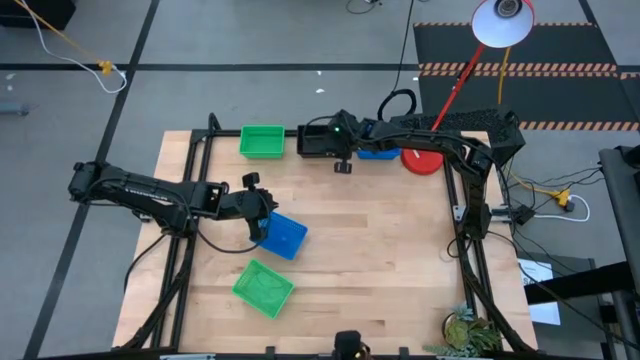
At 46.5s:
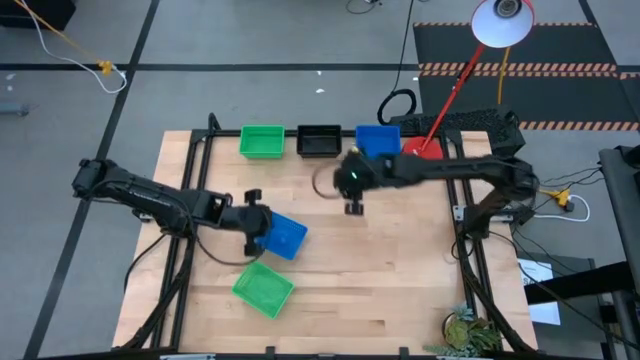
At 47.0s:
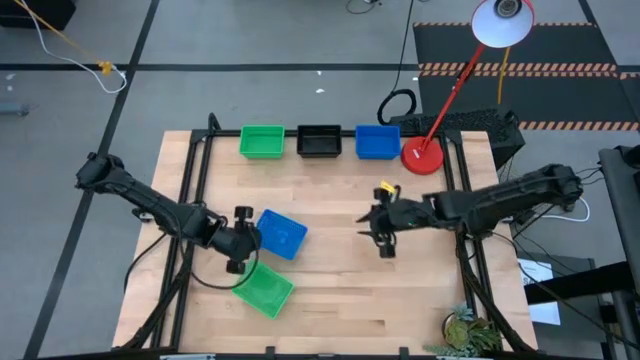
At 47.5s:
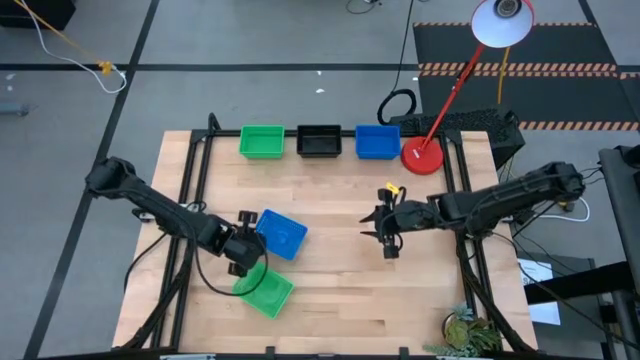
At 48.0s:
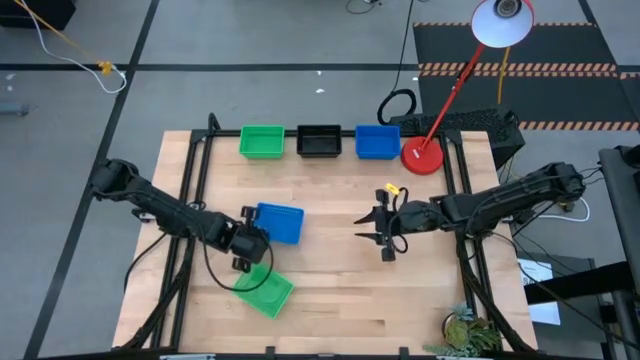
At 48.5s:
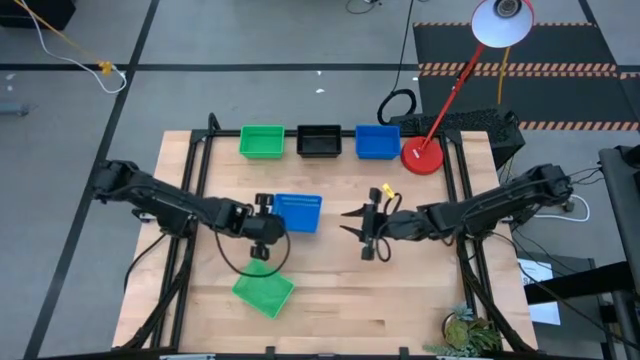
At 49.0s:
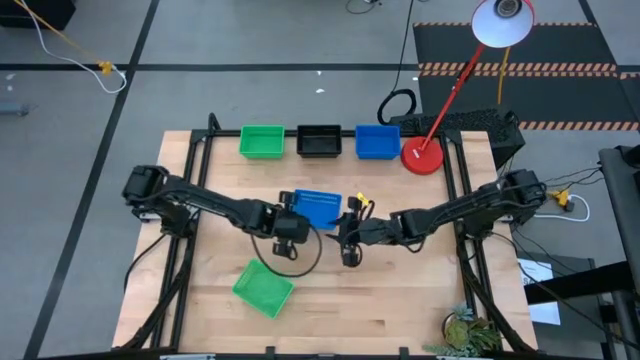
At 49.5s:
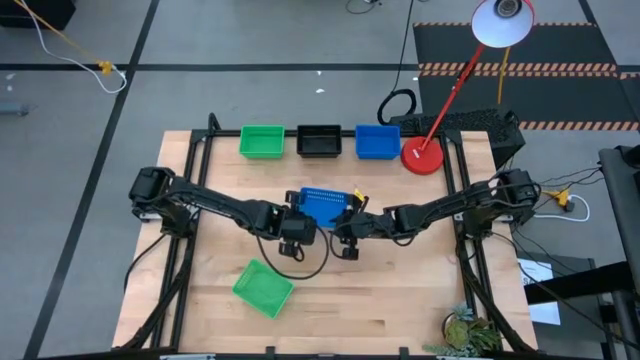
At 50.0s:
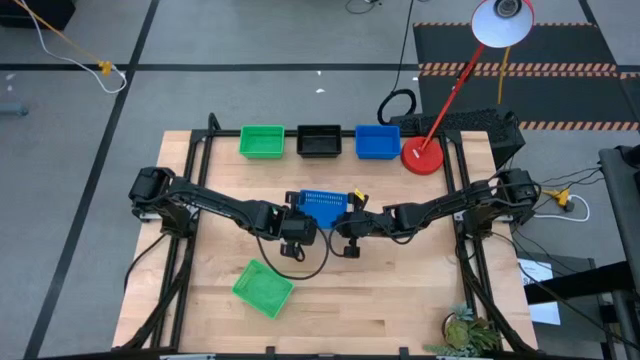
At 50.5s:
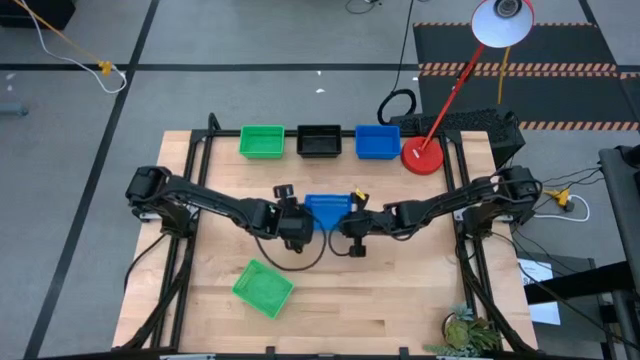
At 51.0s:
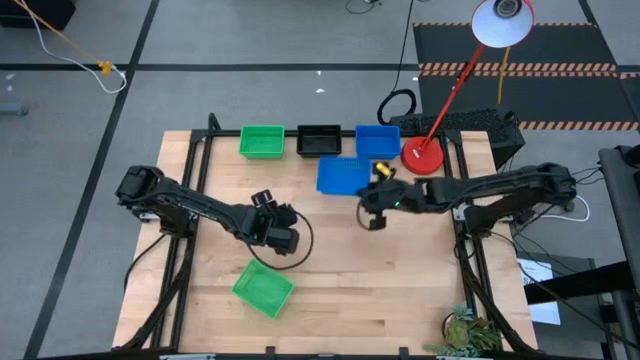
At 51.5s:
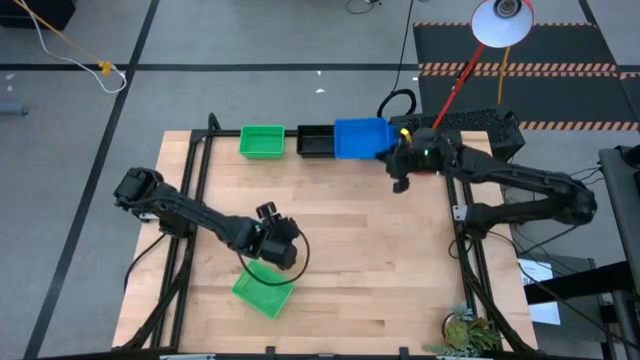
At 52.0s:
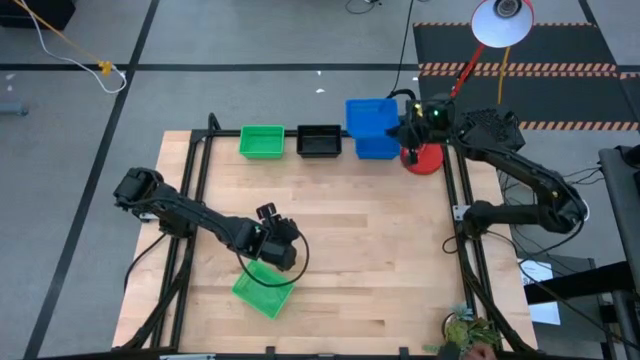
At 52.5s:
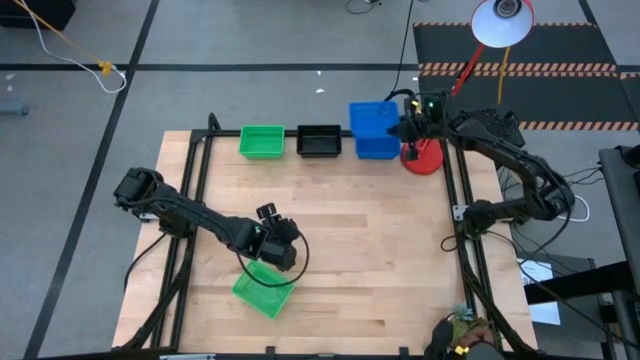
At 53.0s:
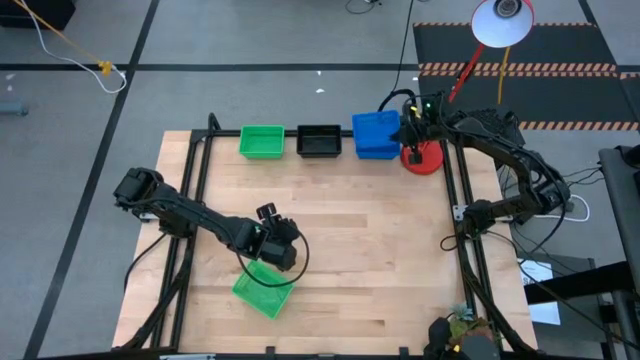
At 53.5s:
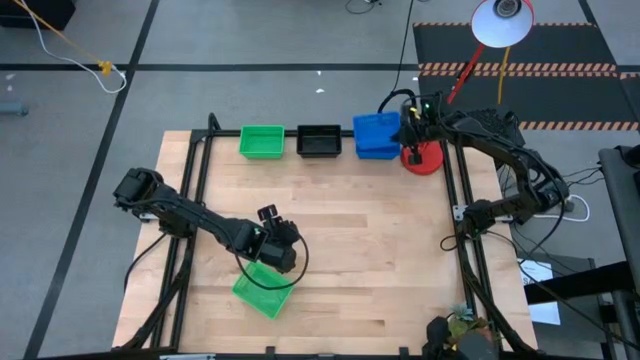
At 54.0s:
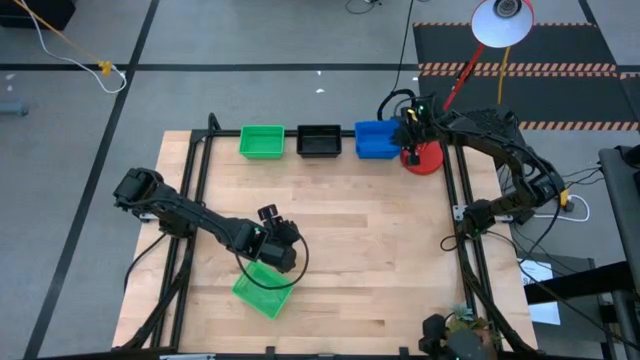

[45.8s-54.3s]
Stack the bottom blue bin on the stacked blue bins

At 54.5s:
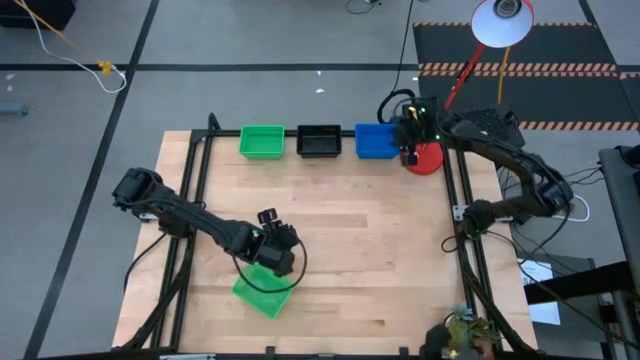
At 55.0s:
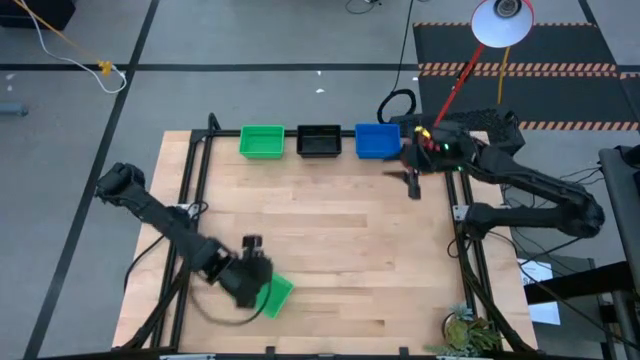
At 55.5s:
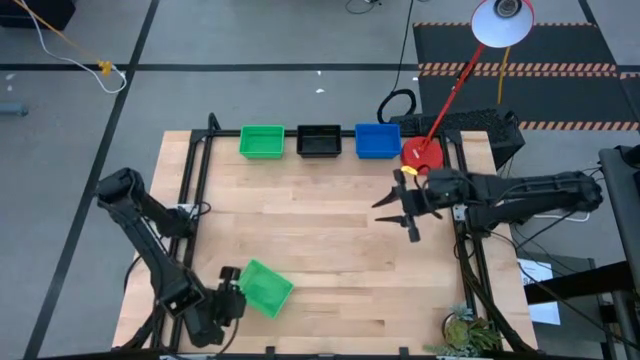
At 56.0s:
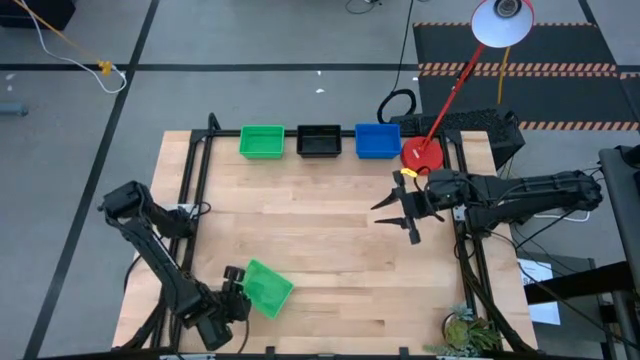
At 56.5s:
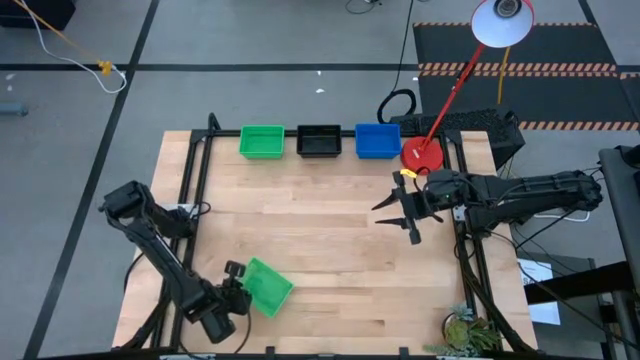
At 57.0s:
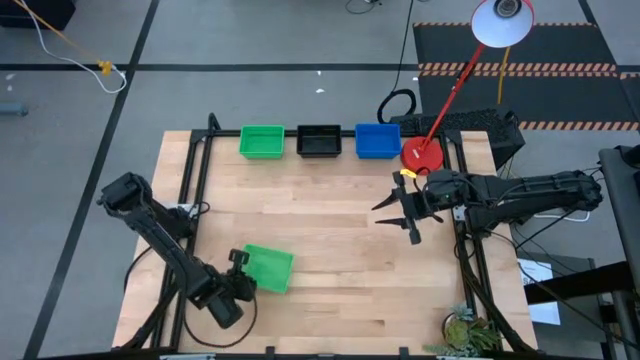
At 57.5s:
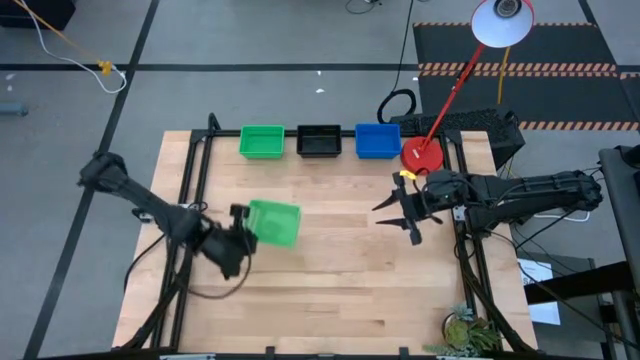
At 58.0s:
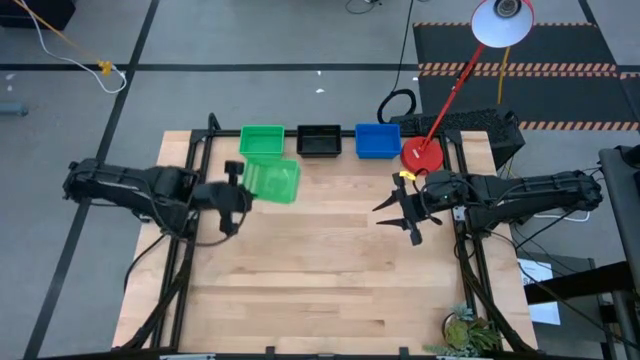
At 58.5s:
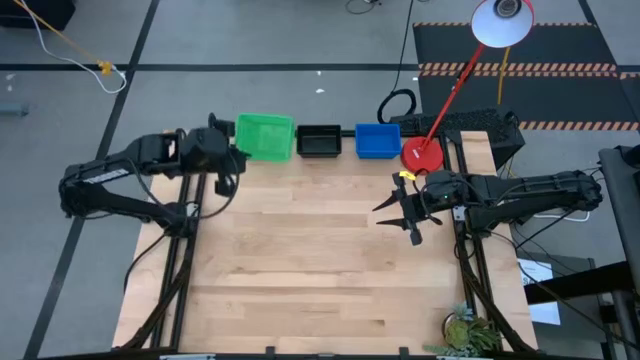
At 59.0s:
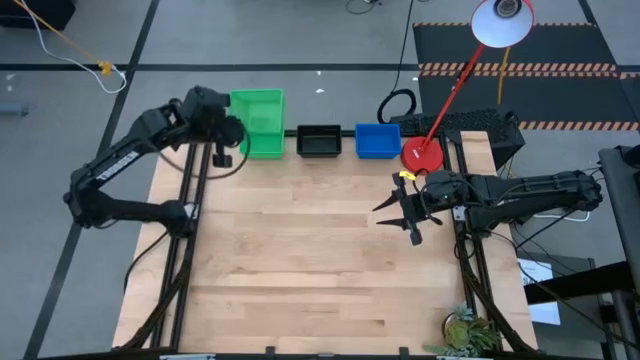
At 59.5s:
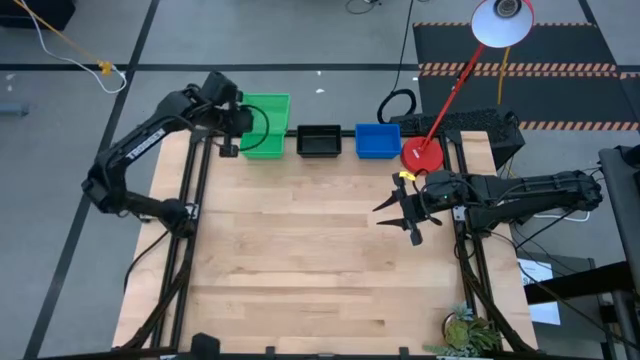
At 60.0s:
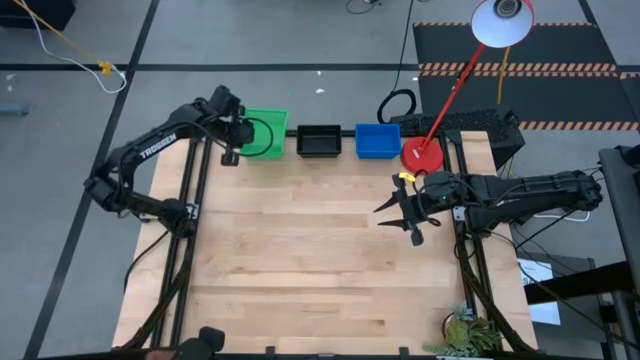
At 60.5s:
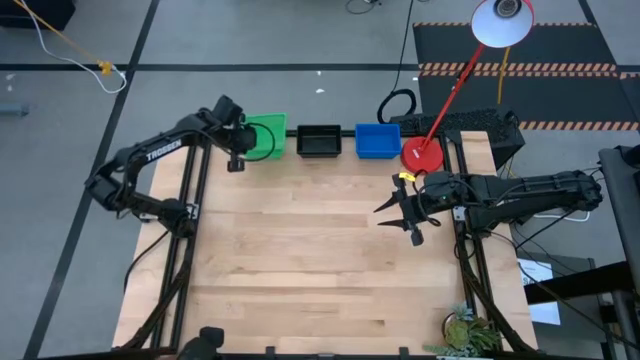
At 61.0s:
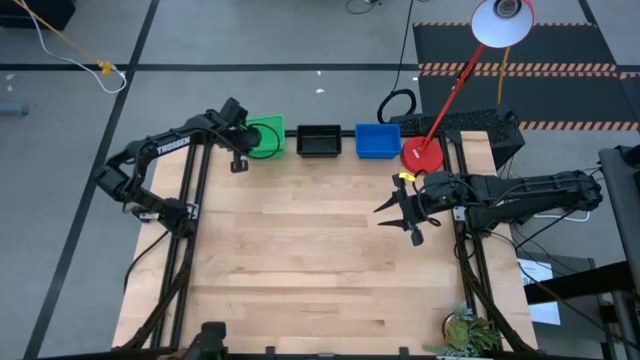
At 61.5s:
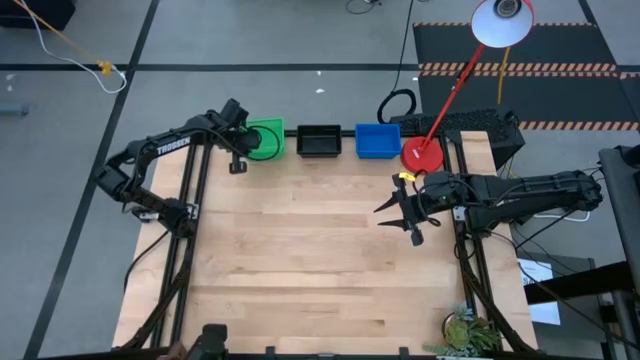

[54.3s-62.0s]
Stack the bottom green bin on the stacked green bins

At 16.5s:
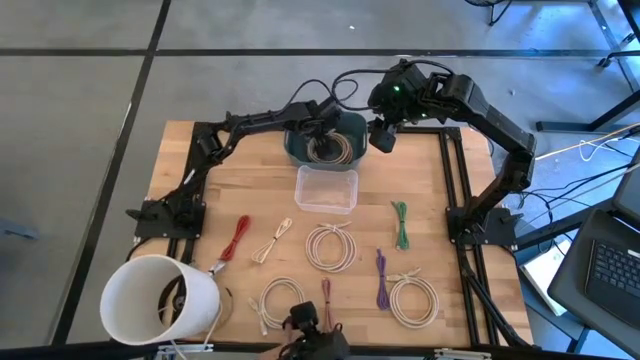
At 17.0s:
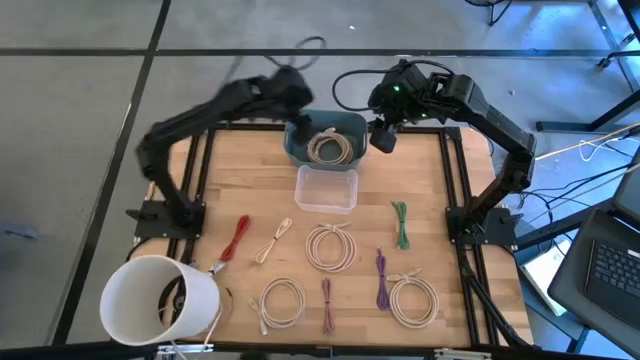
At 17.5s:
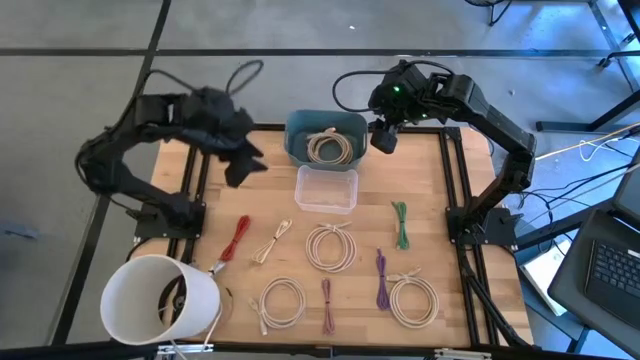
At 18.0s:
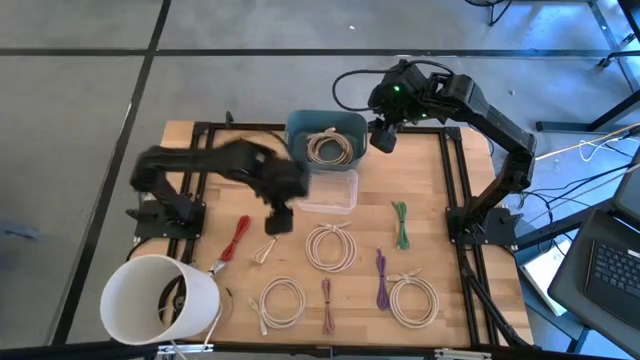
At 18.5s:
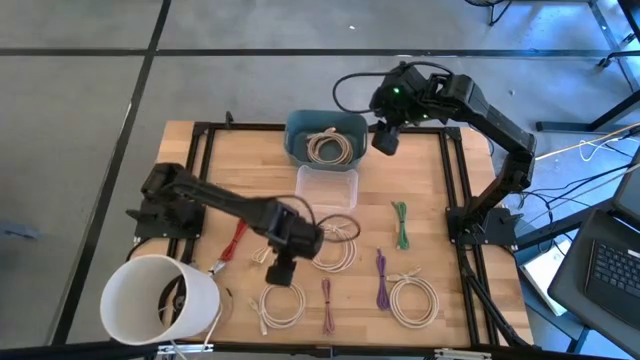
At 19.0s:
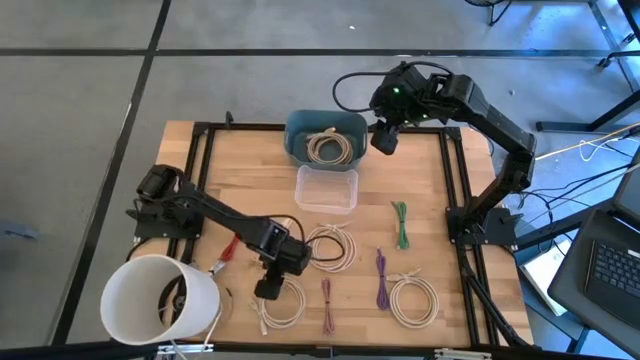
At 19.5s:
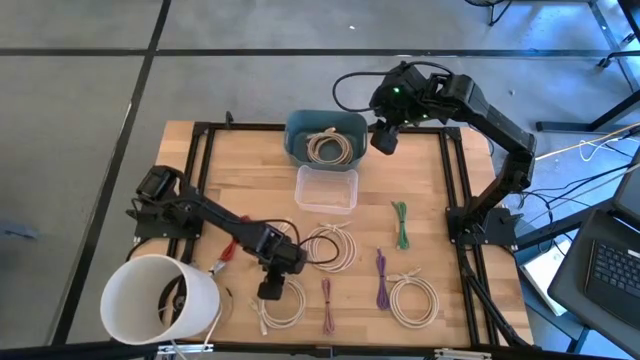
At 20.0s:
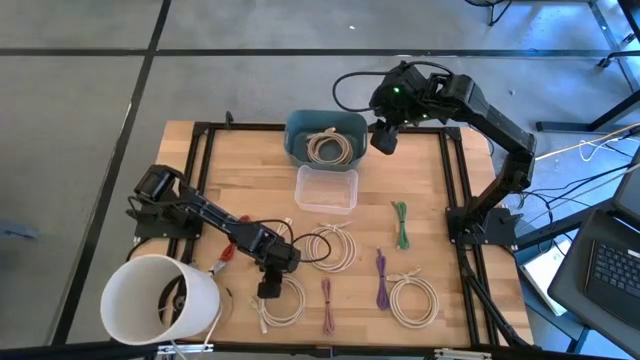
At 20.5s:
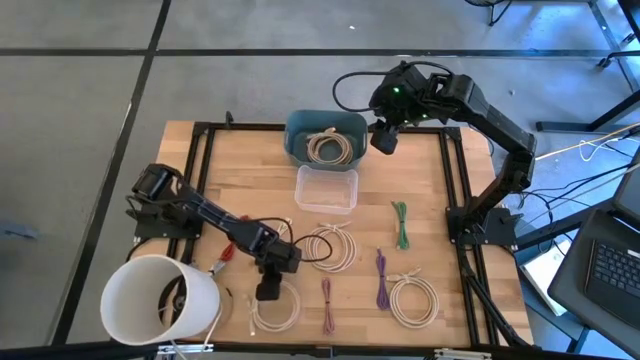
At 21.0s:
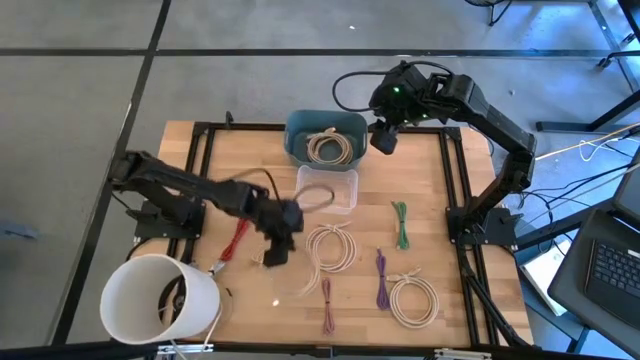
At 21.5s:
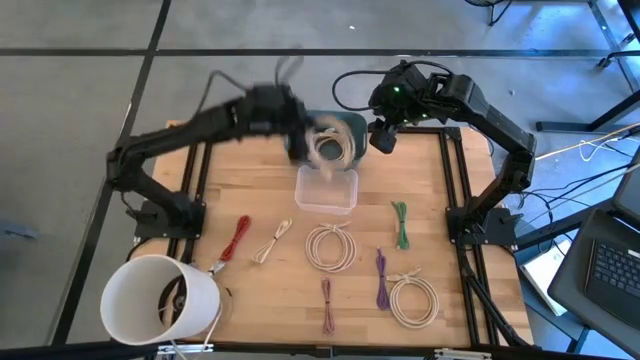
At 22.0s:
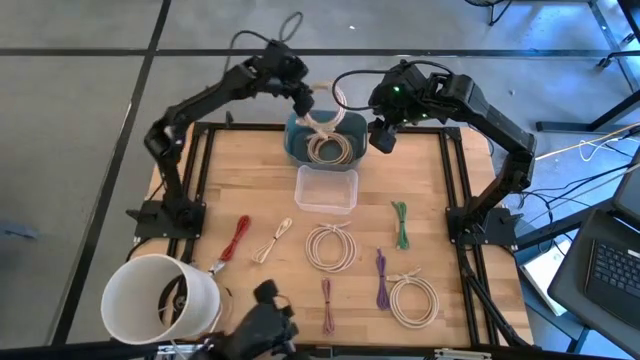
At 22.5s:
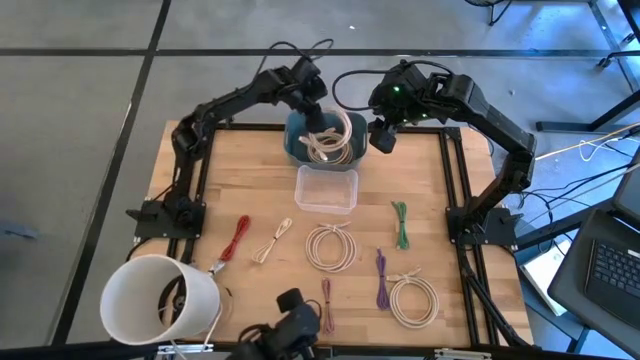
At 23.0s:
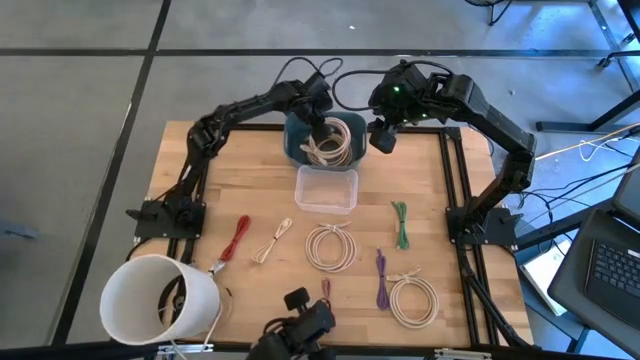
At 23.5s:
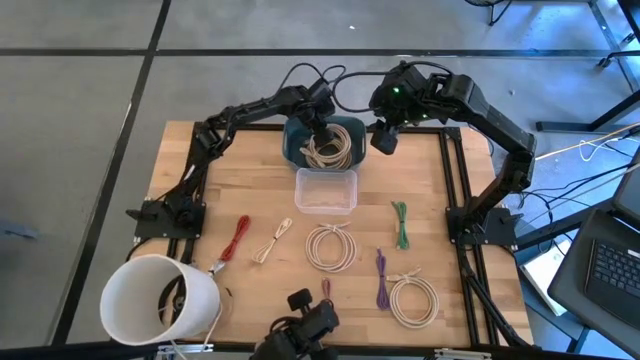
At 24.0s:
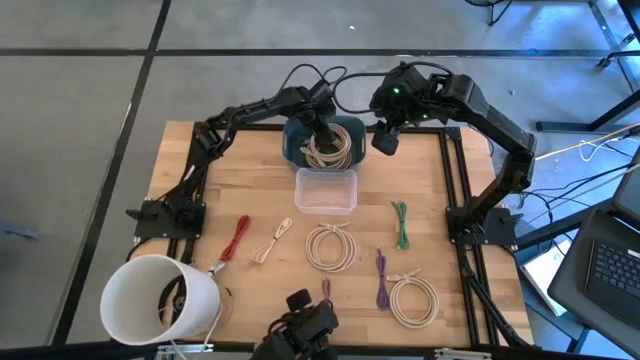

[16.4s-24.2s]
Put the brown HDMI cable into the blue bin
